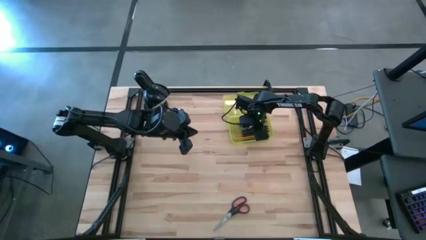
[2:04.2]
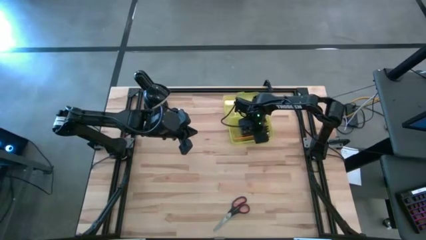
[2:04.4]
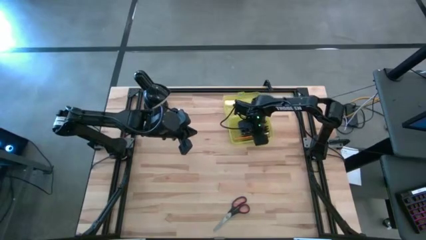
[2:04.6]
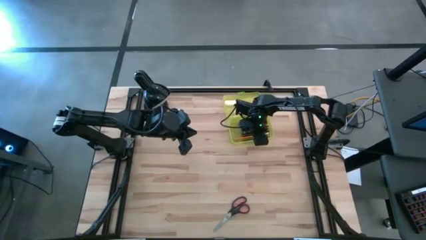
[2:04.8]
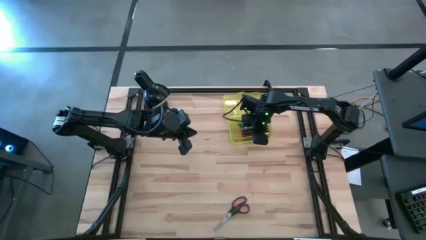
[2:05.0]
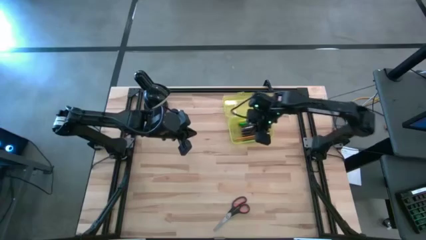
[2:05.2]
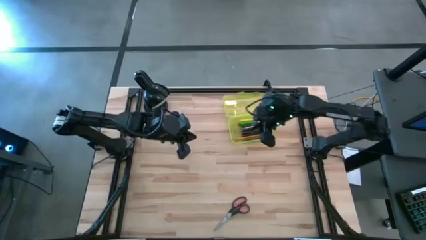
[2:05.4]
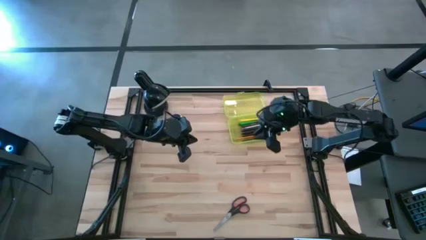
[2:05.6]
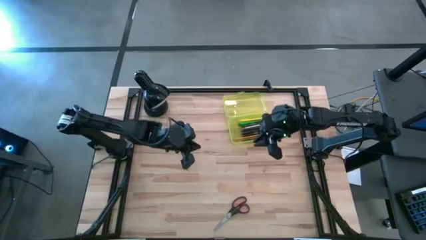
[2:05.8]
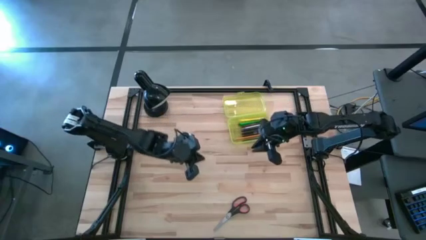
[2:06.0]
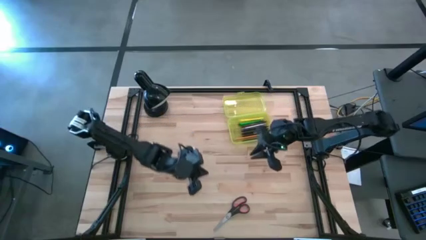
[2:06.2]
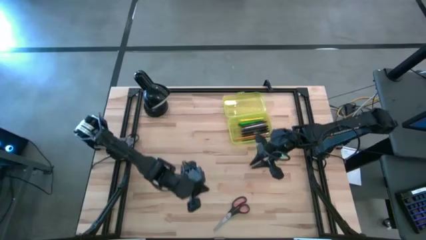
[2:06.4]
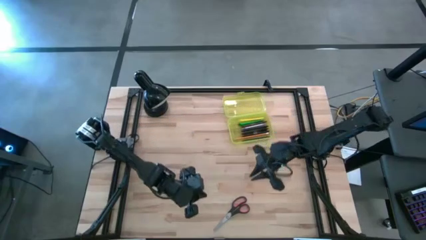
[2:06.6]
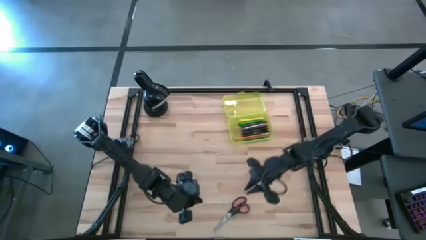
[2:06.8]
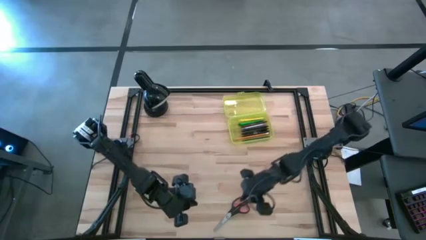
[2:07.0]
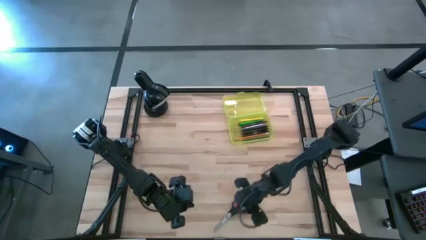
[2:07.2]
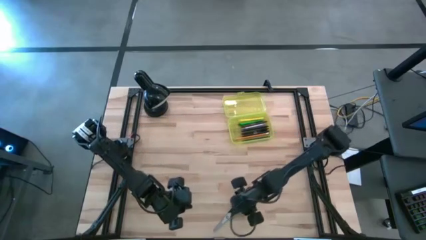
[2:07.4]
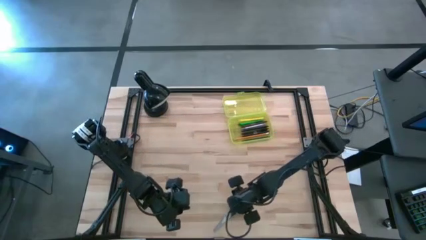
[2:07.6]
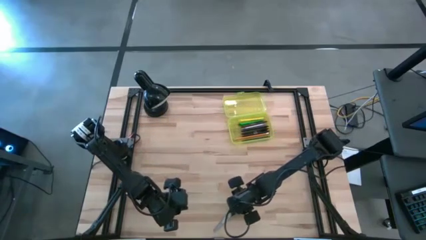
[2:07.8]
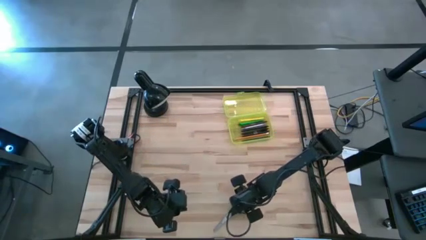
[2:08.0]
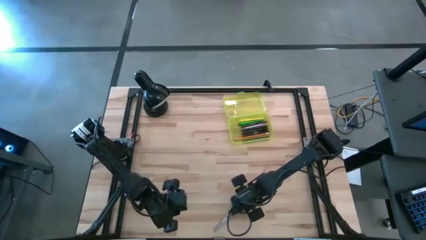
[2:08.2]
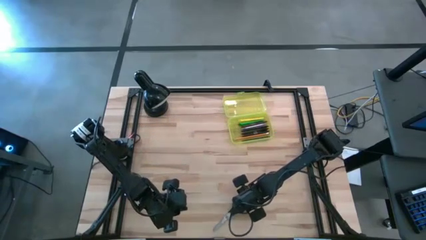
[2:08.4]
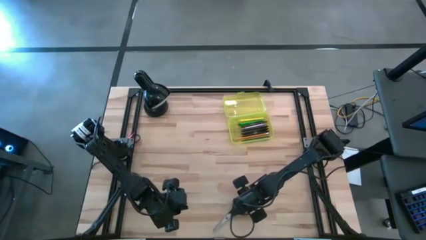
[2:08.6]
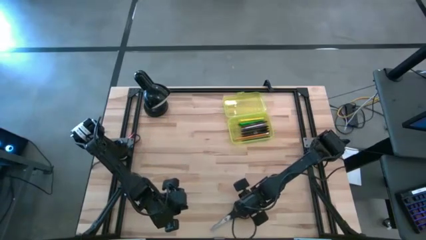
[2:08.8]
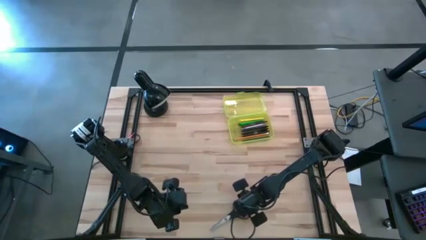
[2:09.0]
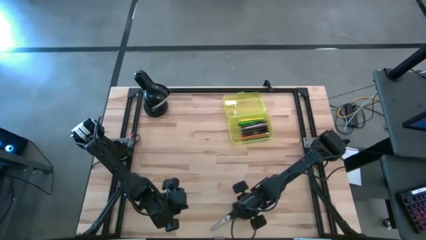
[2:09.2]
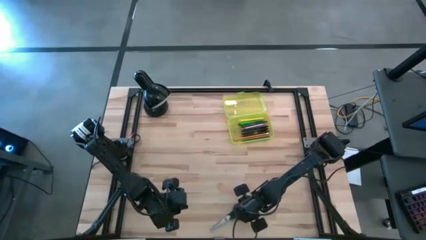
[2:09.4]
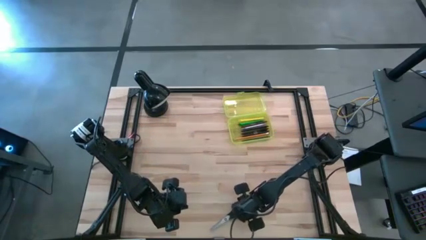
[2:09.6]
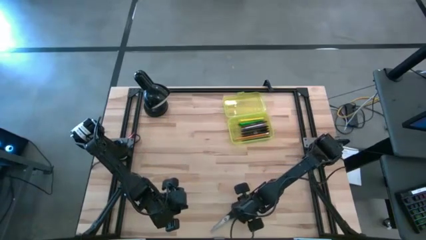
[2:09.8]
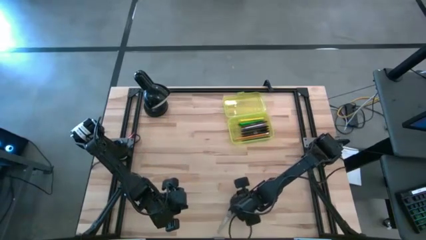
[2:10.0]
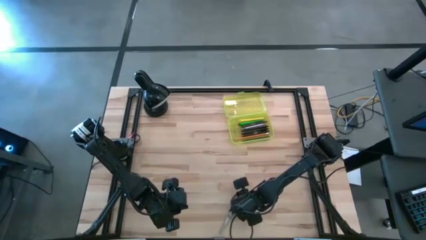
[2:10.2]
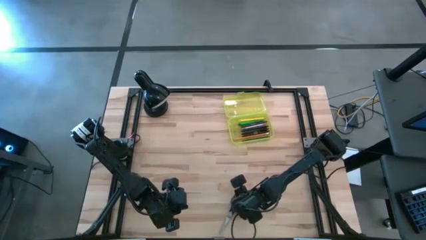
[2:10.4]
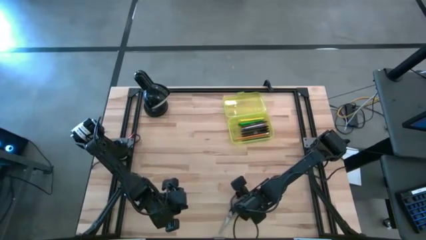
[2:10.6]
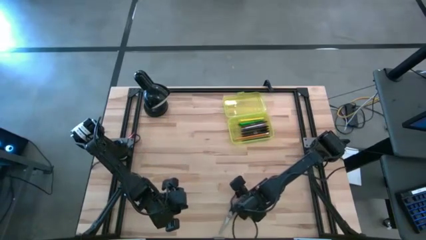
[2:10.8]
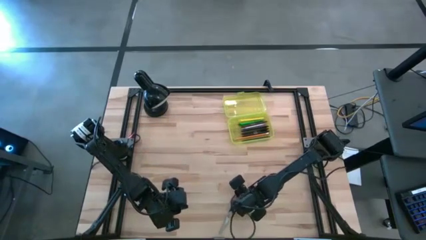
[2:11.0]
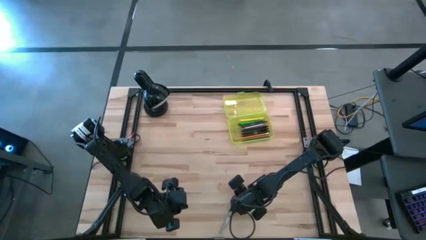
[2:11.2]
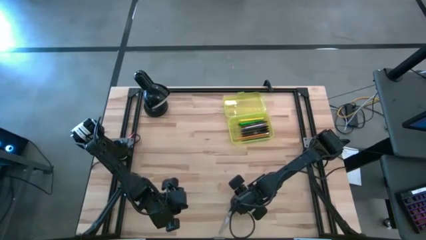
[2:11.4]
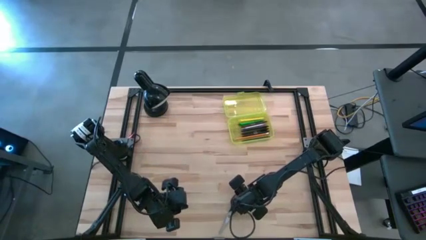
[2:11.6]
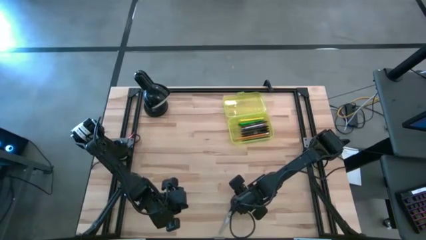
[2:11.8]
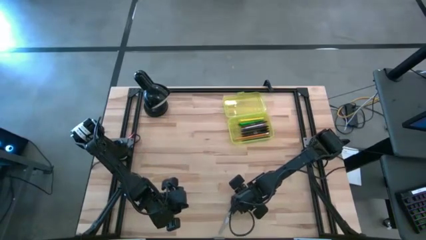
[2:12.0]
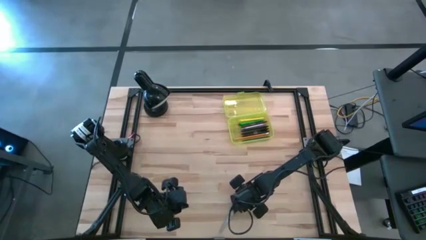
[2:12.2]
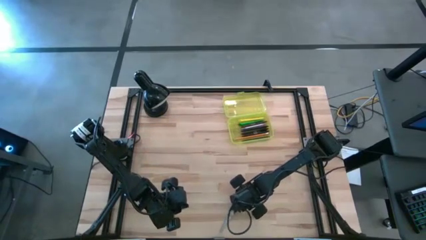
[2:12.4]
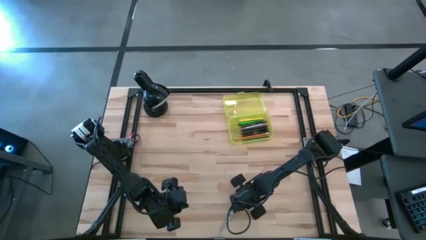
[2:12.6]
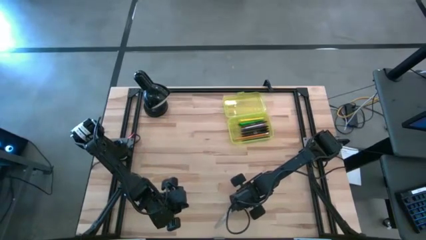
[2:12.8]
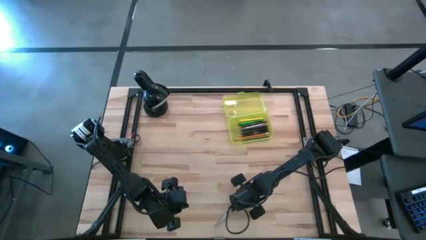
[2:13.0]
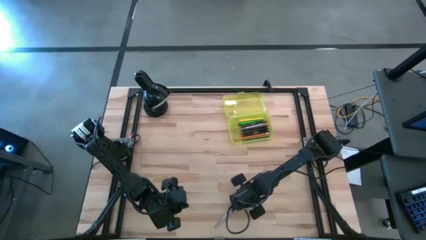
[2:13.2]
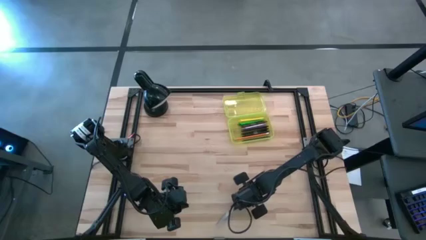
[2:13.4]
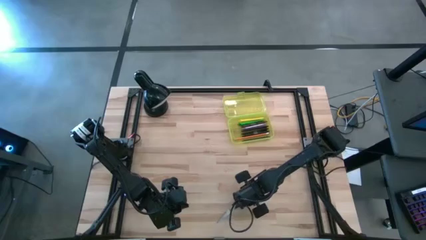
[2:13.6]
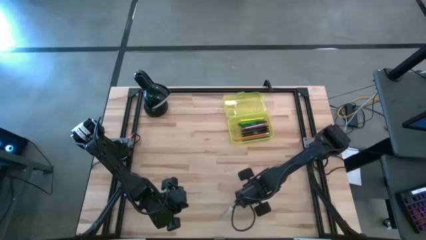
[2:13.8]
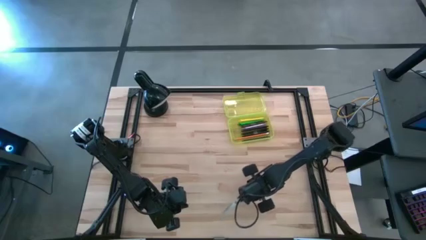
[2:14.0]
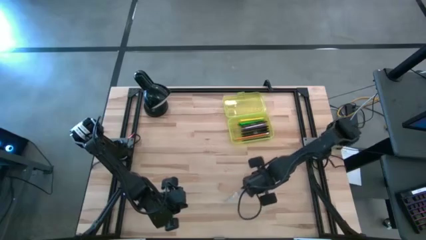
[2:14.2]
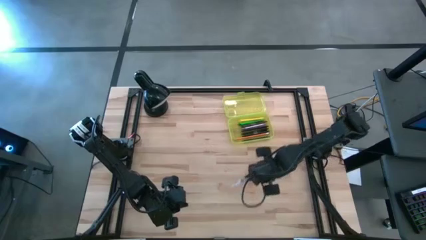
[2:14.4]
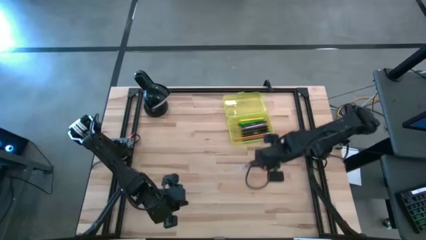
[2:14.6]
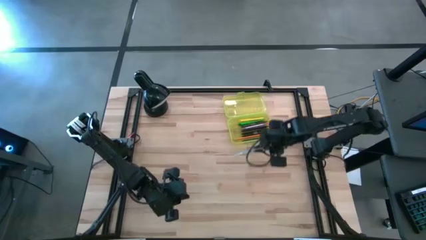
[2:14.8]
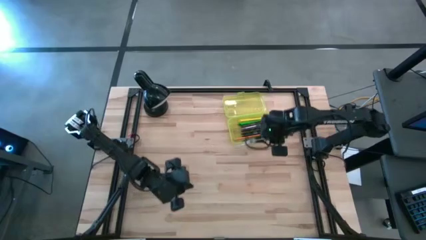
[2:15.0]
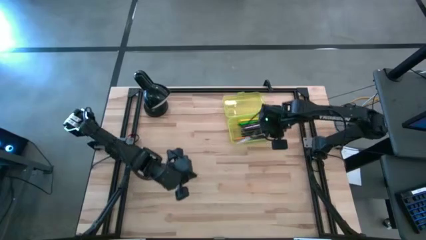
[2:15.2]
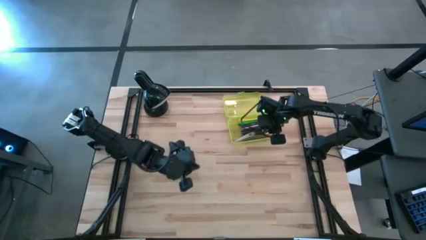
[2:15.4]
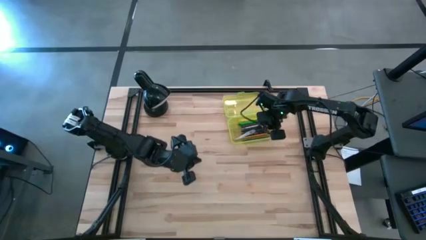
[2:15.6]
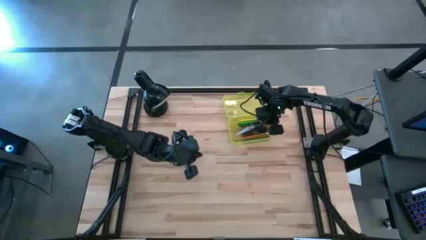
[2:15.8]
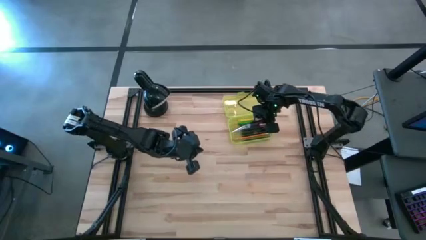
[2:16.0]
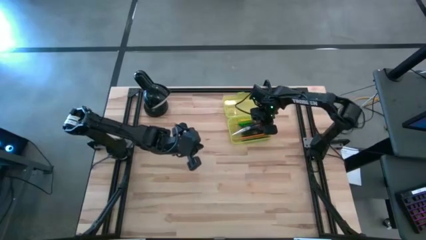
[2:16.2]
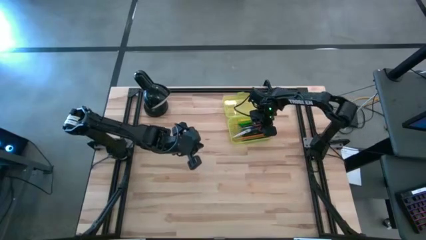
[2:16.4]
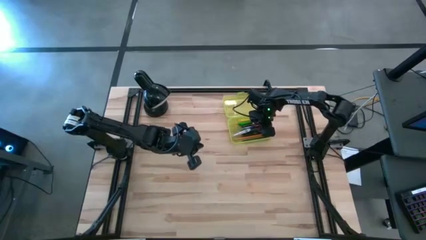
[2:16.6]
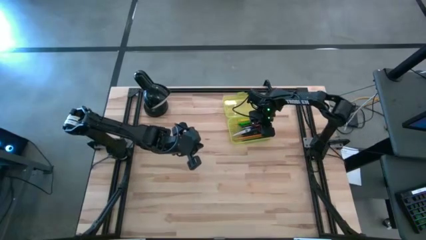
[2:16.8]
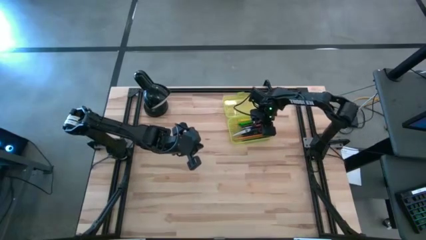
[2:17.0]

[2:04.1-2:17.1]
Task: Pick & place school supplies into a supply box
Put the scissors into the supply box
